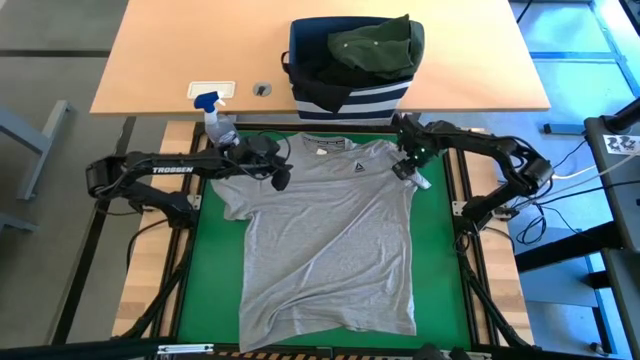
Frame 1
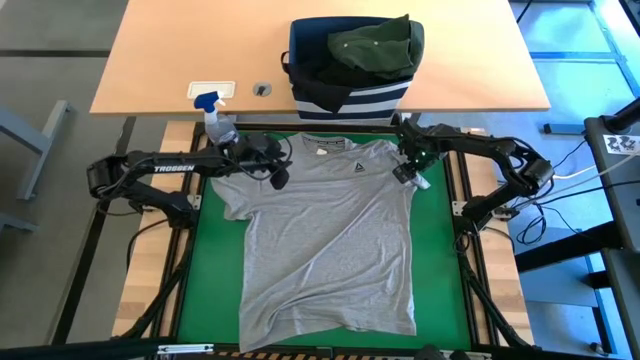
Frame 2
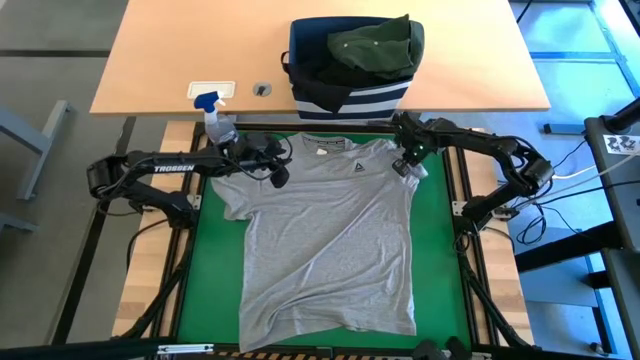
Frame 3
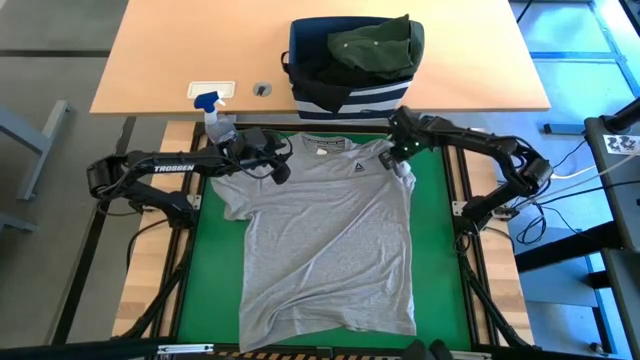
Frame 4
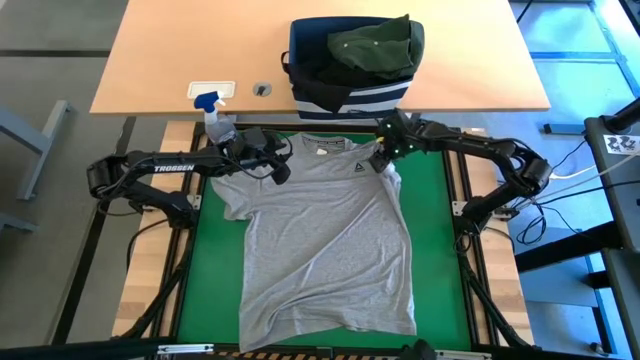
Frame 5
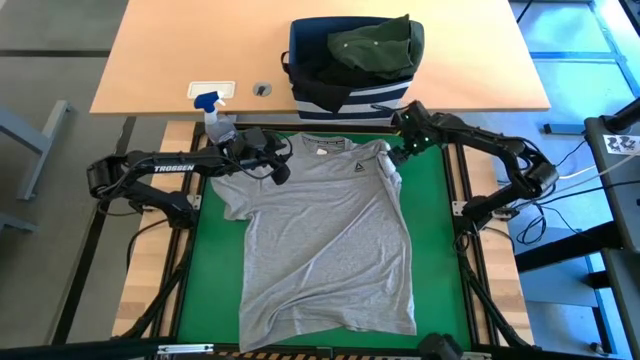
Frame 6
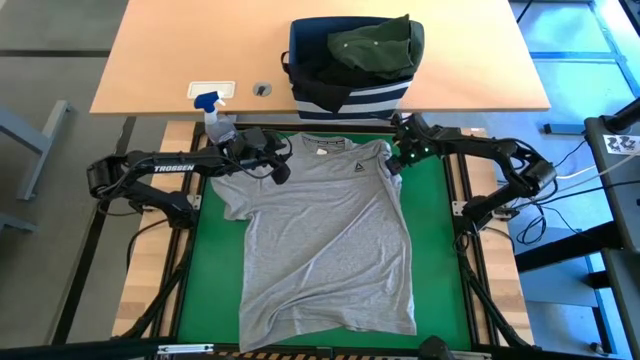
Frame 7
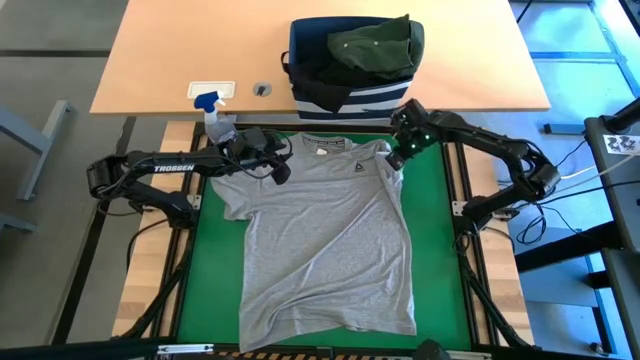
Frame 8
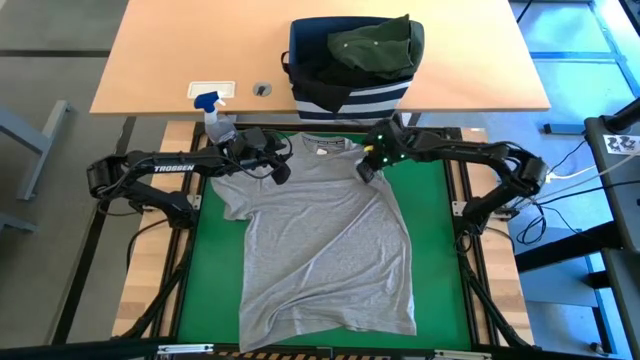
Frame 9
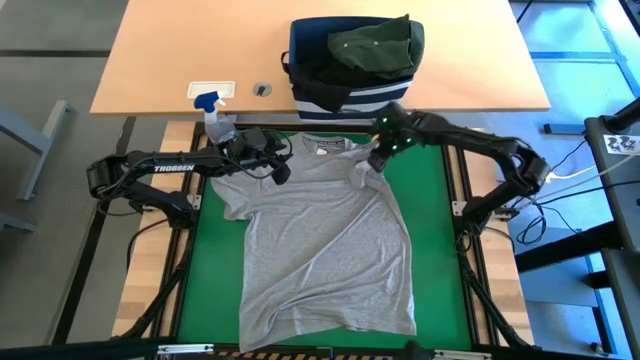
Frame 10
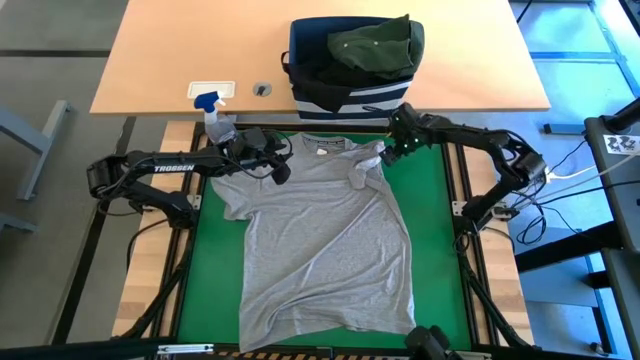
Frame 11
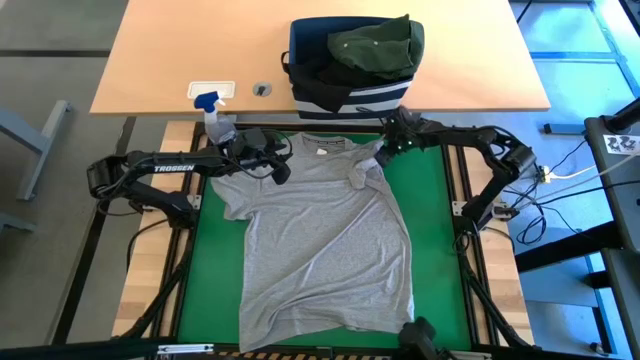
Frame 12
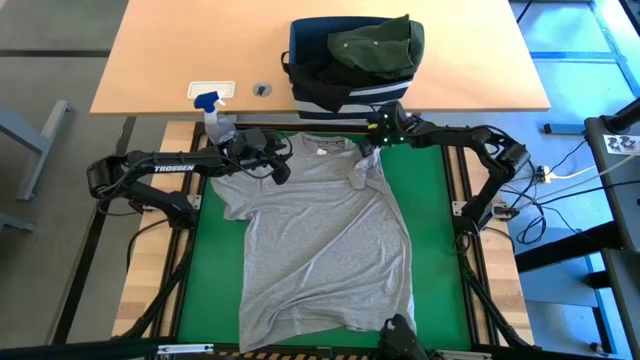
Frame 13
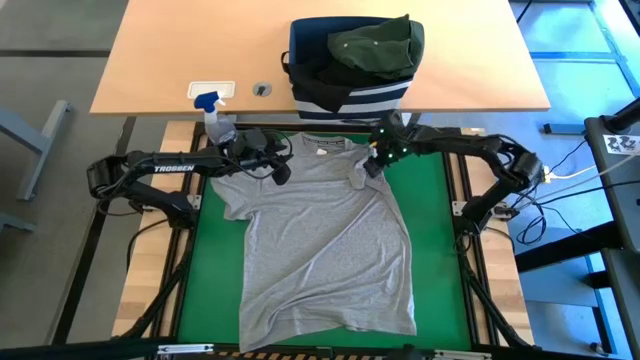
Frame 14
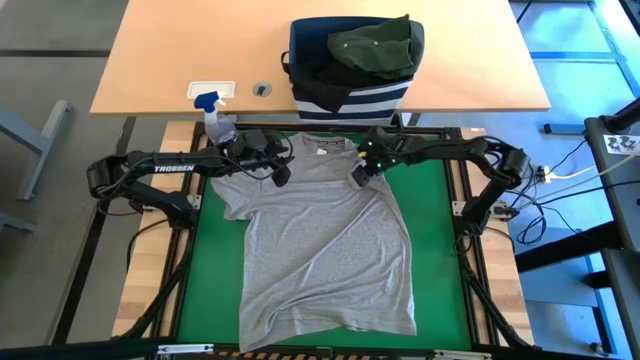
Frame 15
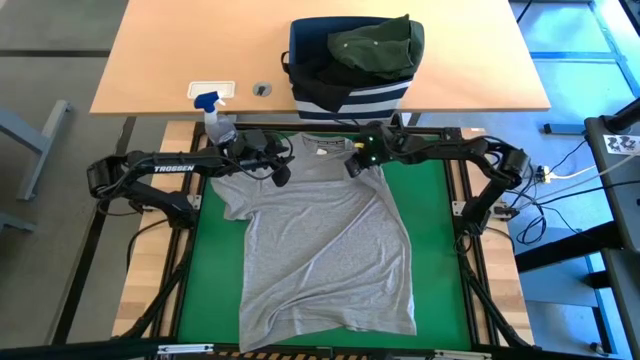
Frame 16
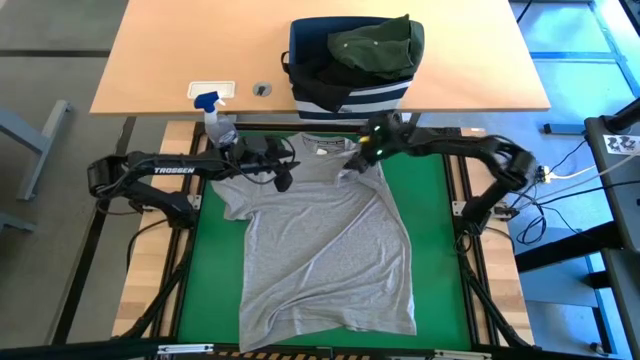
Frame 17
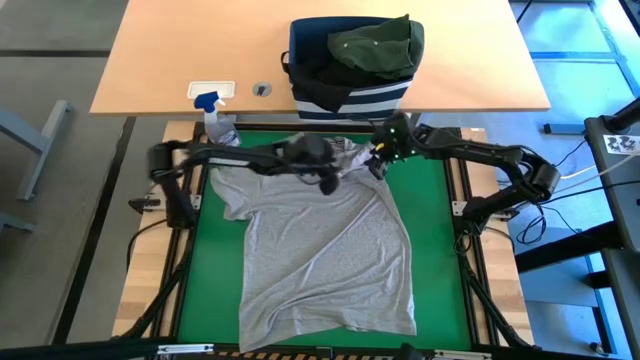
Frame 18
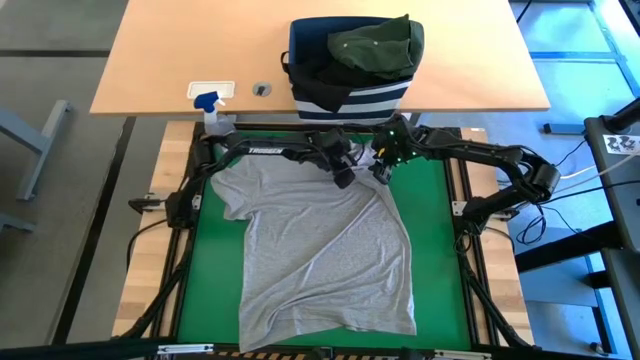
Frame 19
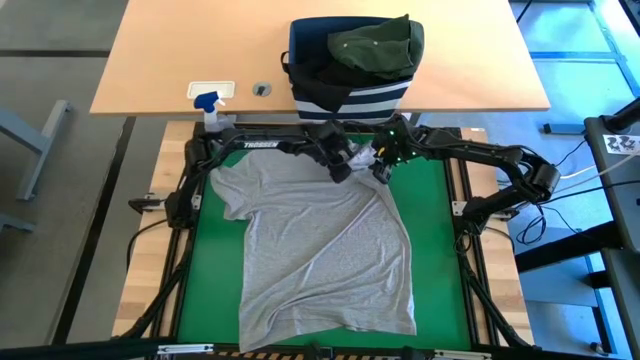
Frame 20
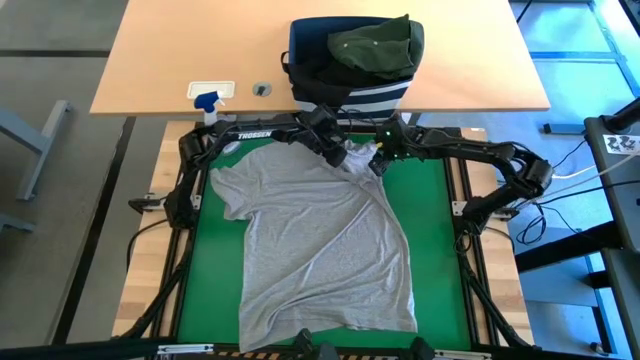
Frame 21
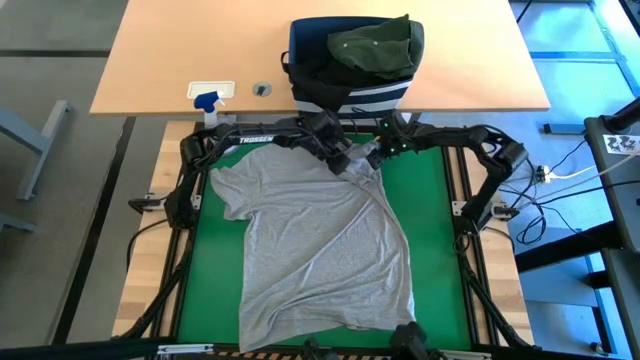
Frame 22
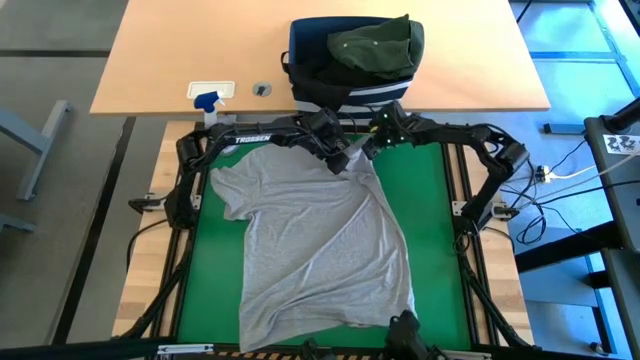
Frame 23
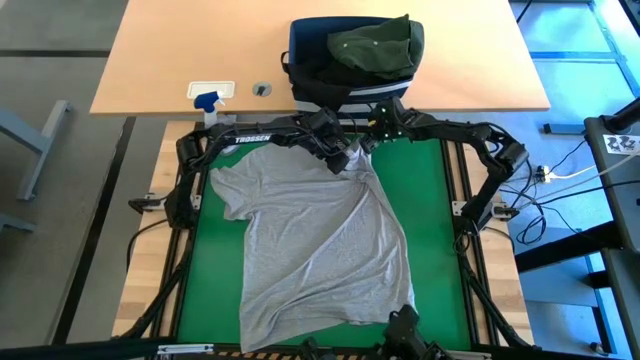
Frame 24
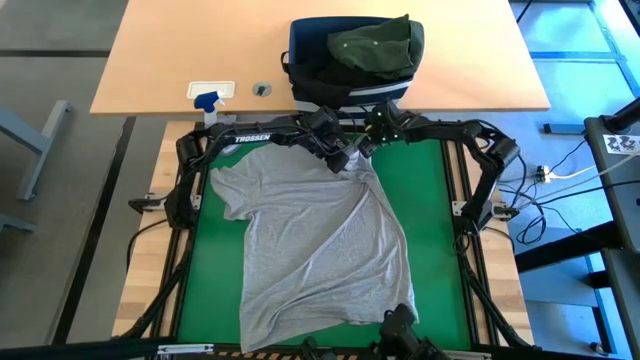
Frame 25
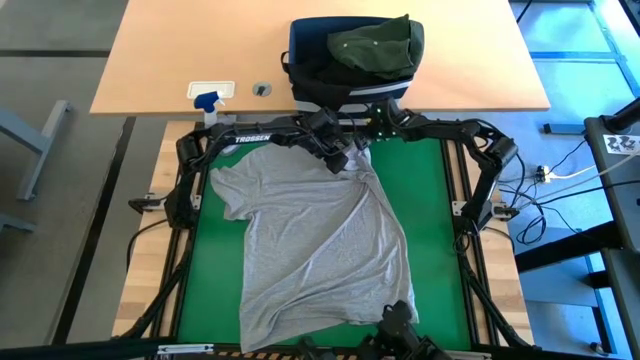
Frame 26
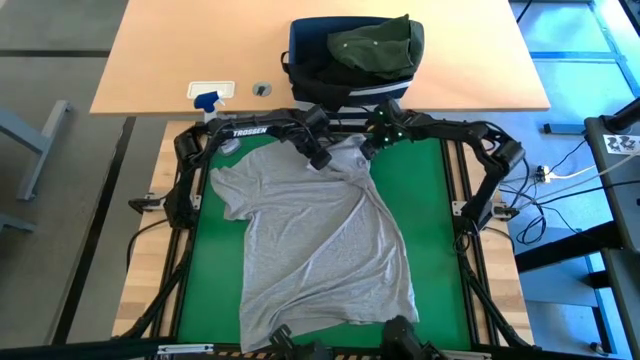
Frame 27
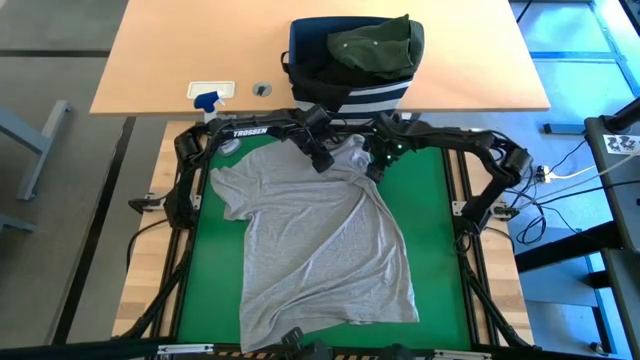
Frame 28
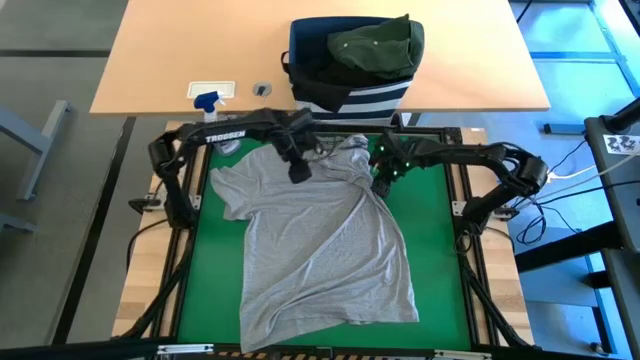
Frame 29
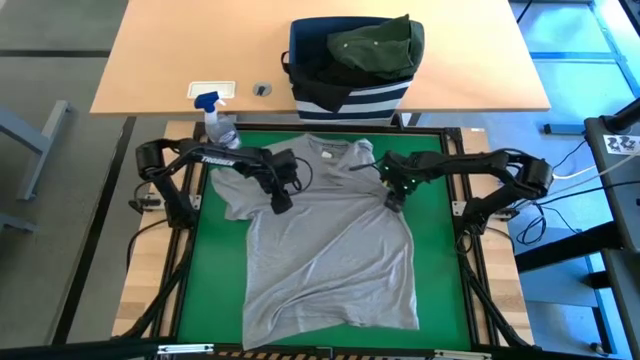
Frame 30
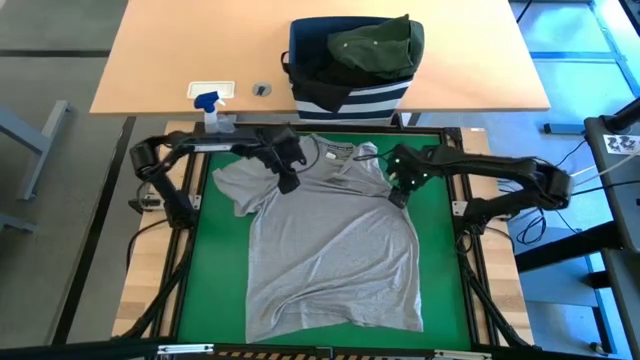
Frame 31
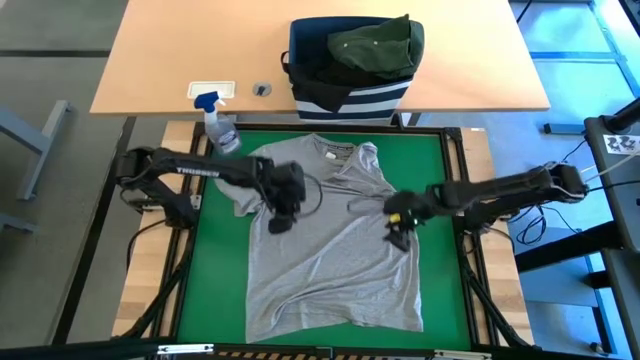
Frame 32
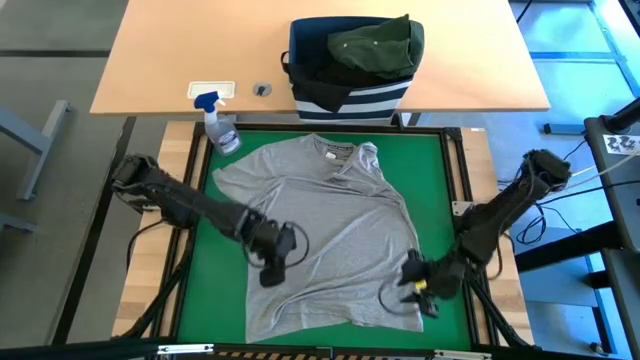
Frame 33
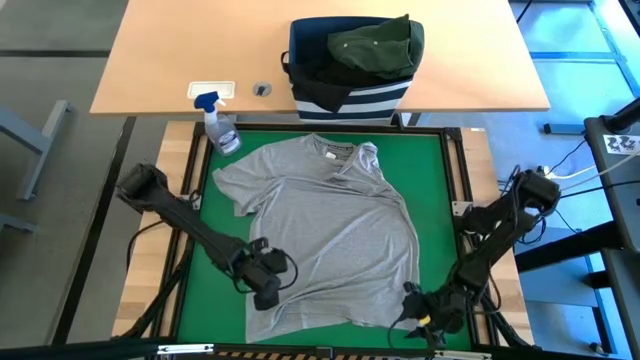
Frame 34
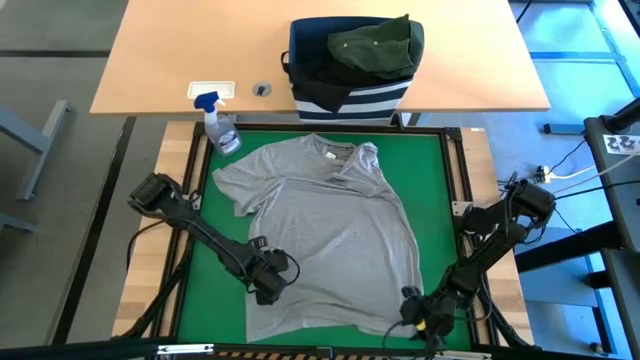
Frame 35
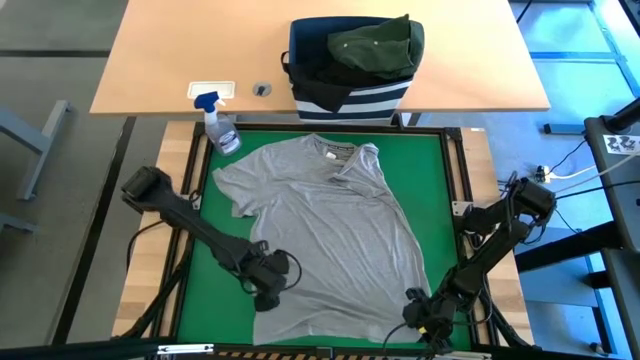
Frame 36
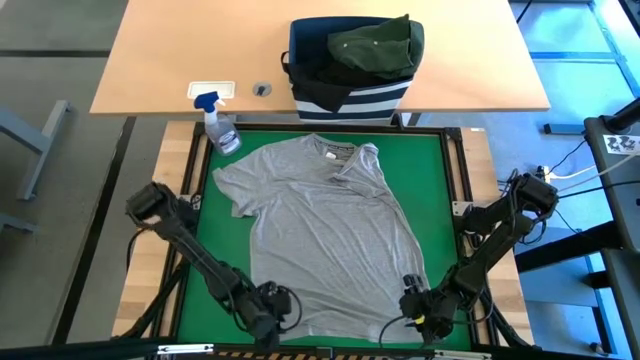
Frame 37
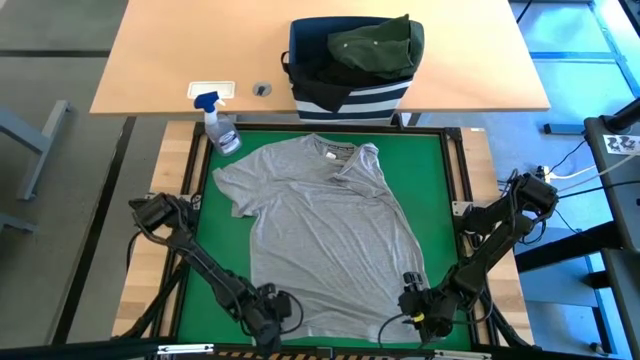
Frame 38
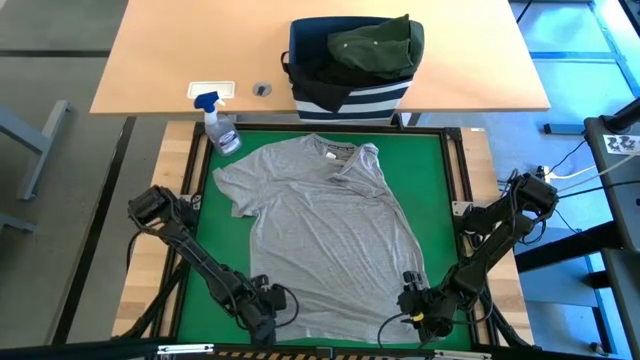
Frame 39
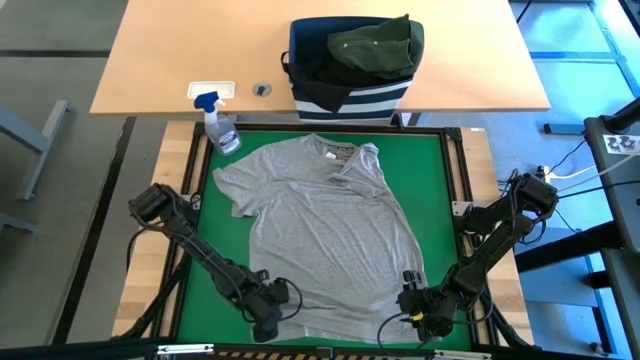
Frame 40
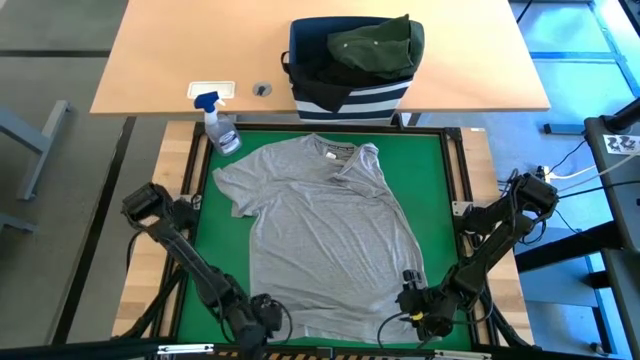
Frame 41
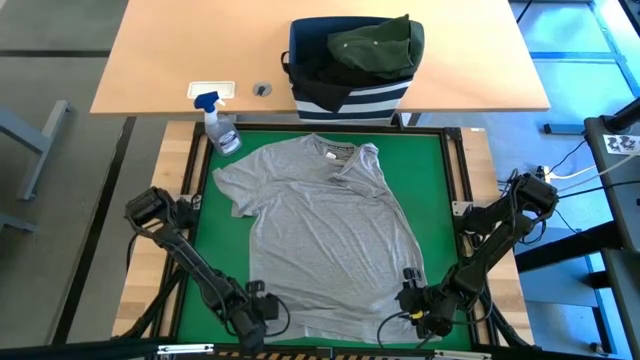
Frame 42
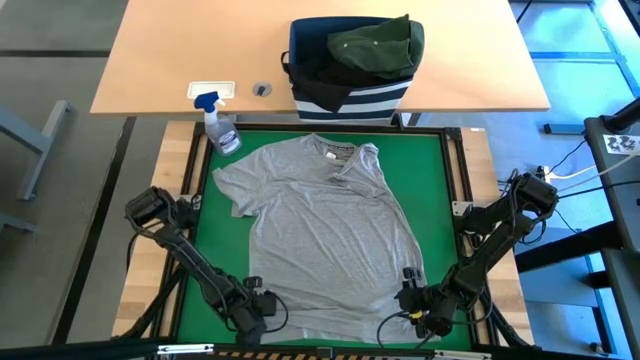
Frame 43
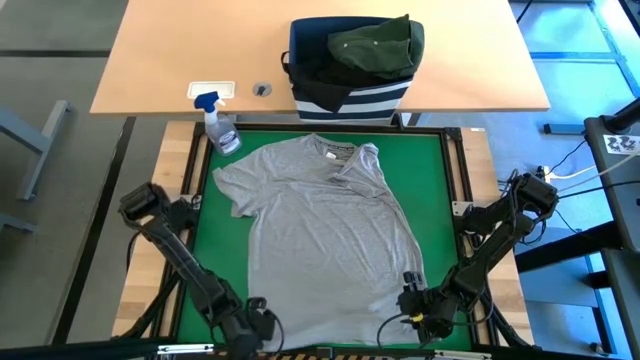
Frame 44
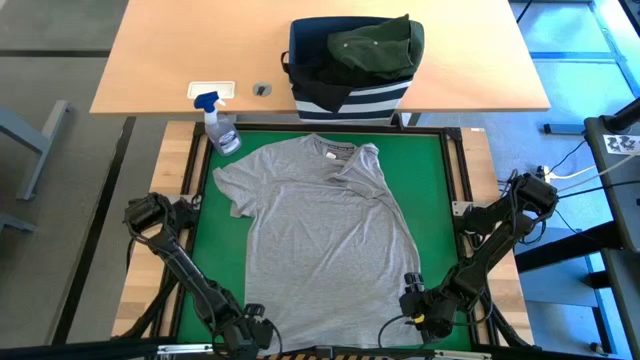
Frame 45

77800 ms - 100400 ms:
Task: Fold Laundry from Bin
Fold the gray shirt
